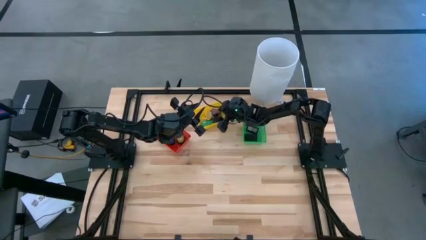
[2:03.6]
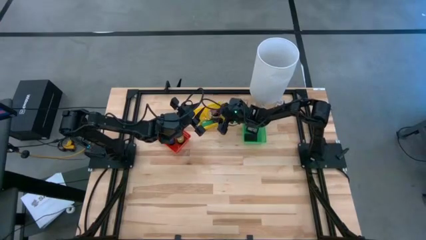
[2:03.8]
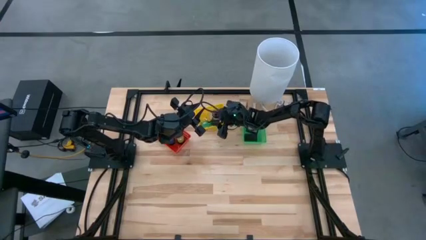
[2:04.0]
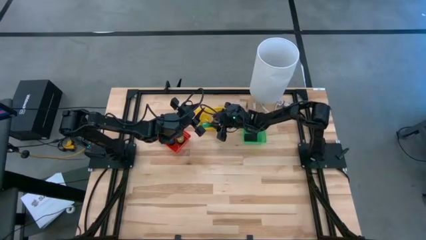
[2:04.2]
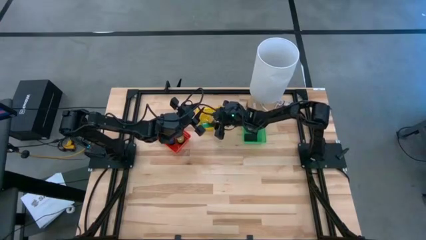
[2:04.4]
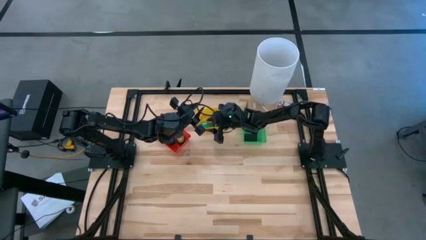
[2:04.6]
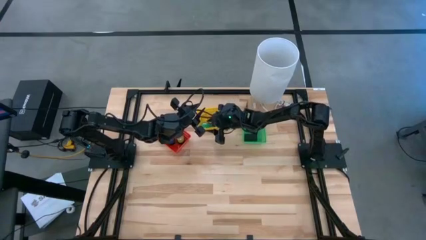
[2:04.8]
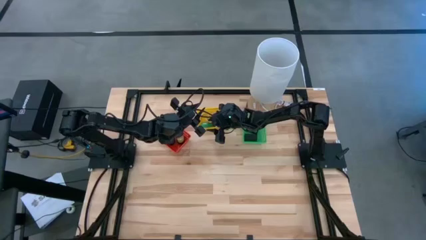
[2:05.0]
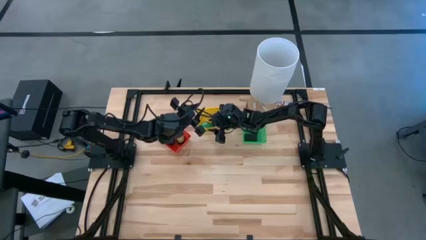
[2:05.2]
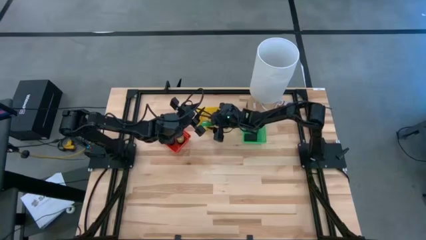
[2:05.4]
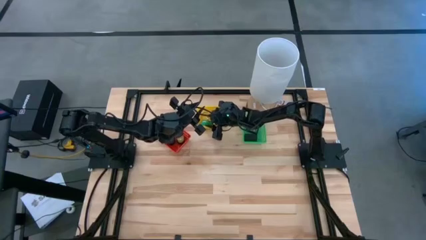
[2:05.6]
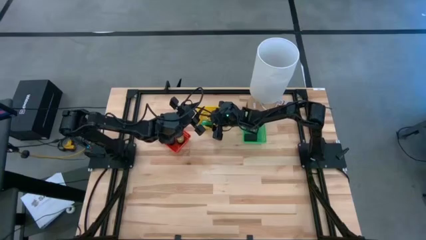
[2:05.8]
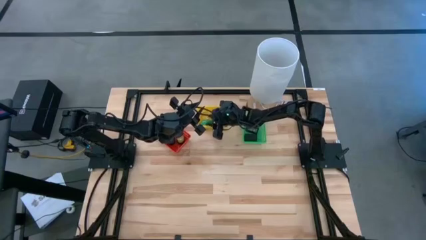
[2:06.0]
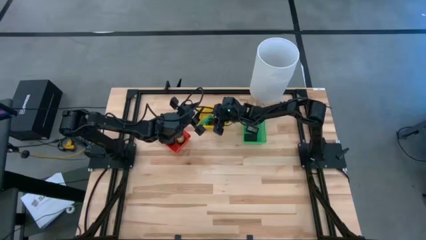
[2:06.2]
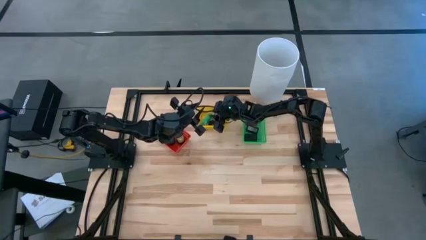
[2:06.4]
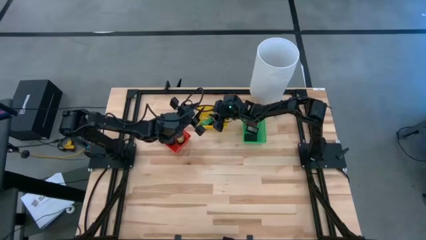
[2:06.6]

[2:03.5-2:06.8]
Task: Pick & Place Office items
Adjust the green watch

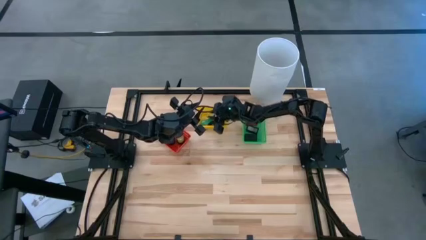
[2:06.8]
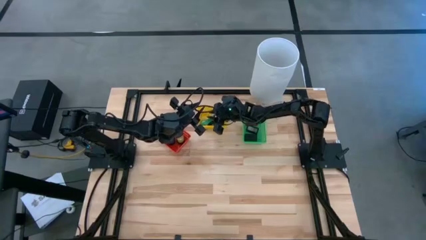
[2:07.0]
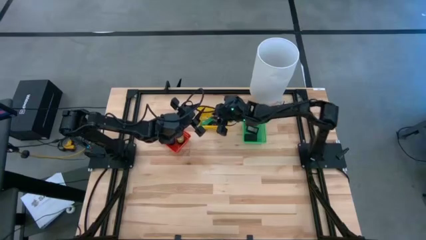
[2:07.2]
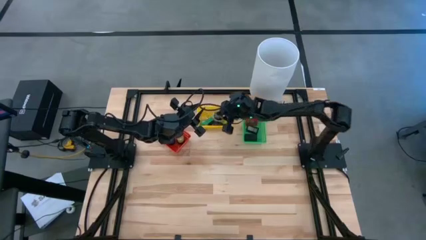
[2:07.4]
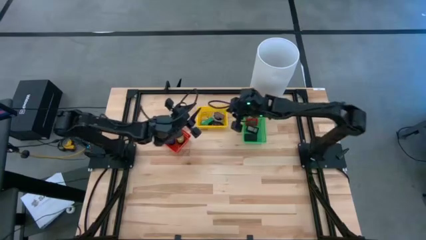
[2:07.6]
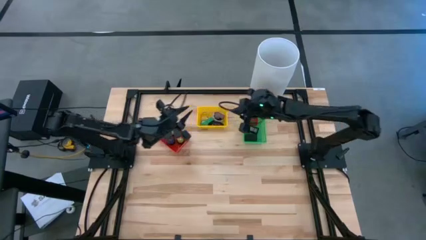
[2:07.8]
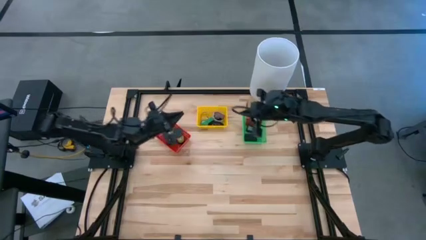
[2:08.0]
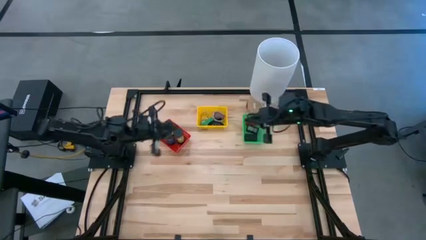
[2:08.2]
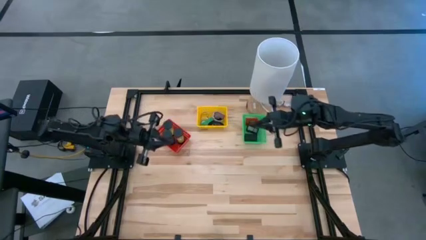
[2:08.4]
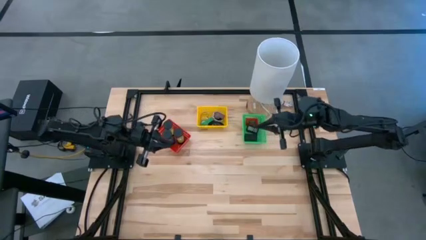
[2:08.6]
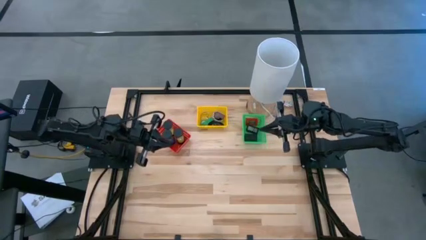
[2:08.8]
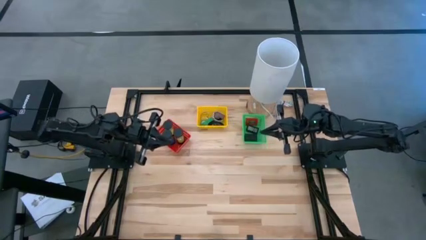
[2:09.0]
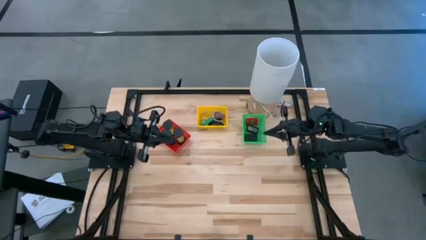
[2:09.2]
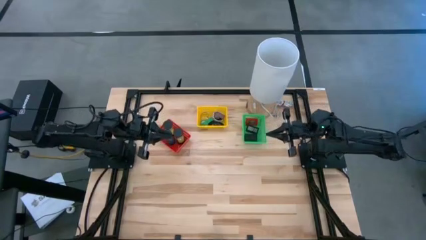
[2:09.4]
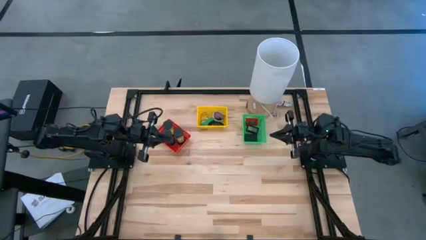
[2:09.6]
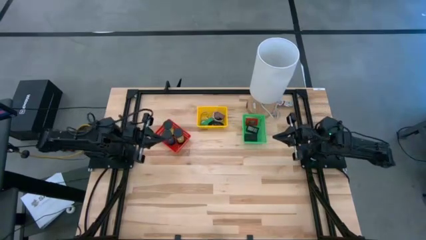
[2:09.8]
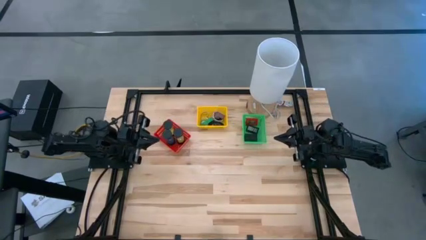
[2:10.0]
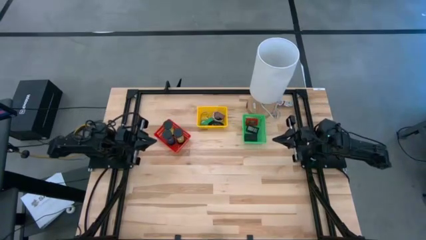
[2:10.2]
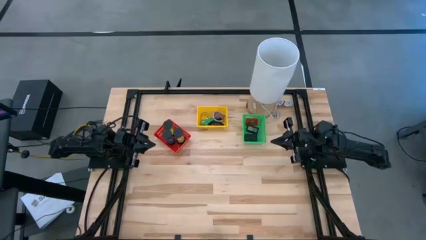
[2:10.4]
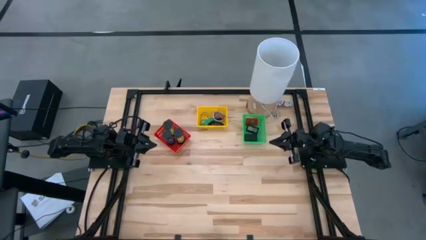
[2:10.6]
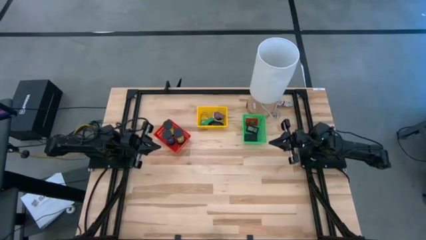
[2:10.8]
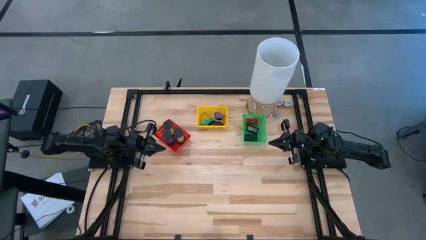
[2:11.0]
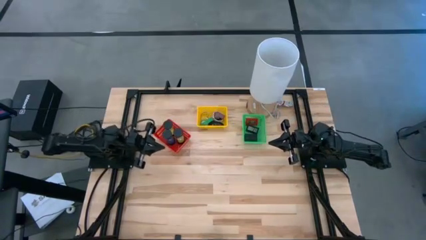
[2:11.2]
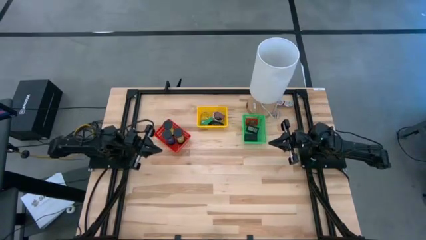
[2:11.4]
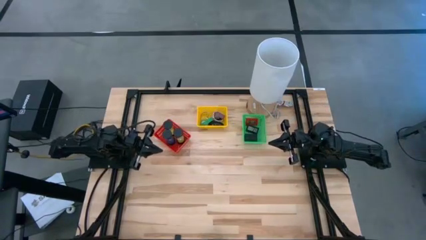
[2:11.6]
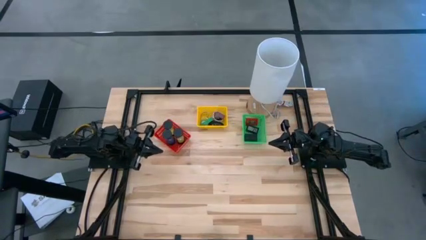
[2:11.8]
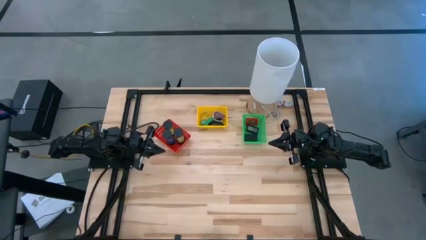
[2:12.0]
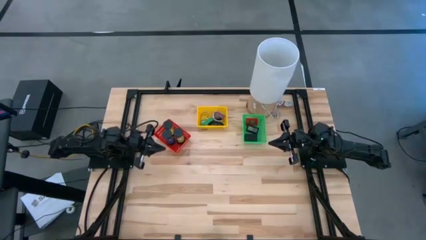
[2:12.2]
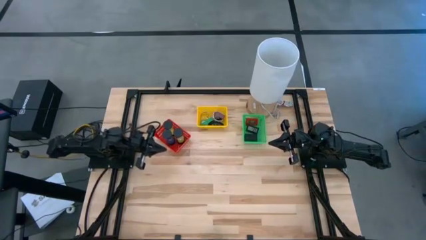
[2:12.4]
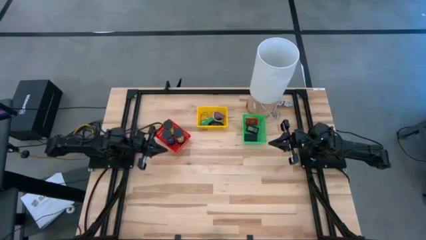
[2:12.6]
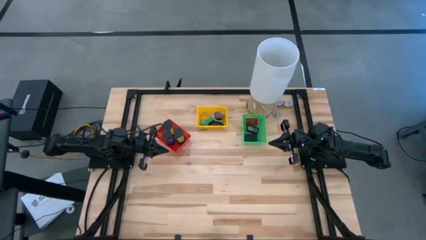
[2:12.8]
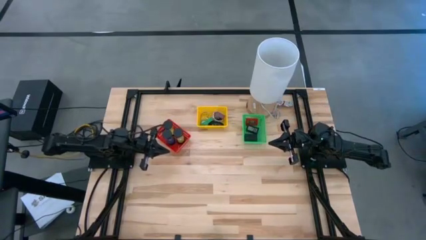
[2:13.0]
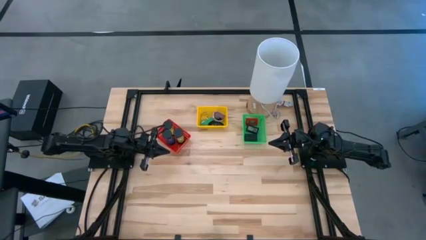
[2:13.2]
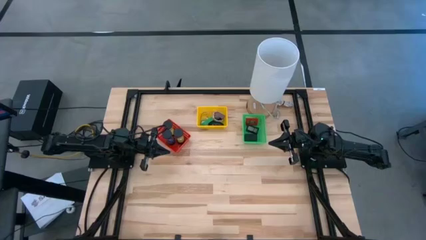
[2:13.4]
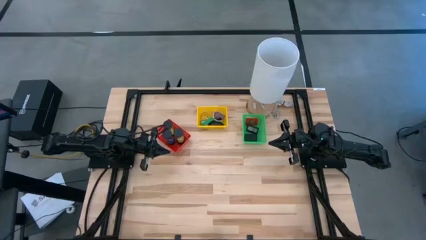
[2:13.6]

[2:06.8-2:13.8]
Return to Home Position

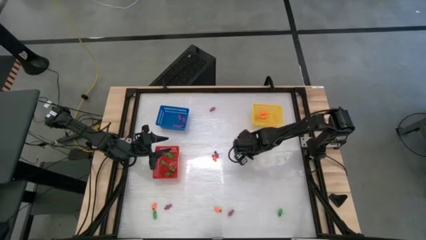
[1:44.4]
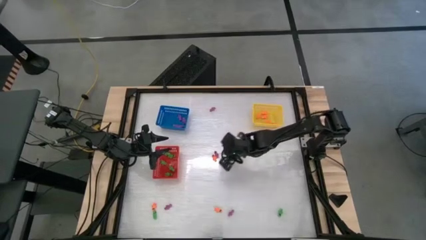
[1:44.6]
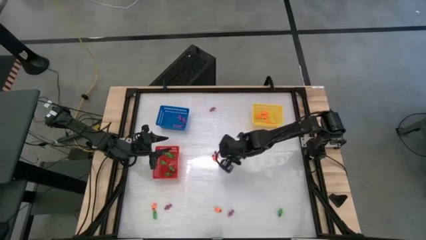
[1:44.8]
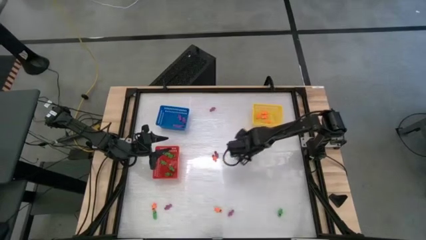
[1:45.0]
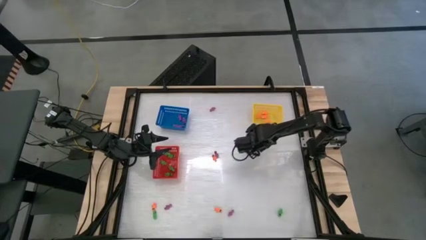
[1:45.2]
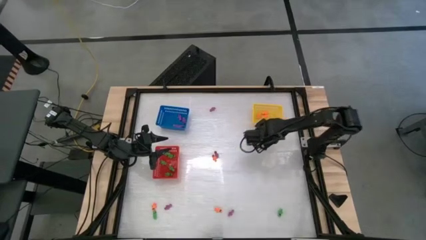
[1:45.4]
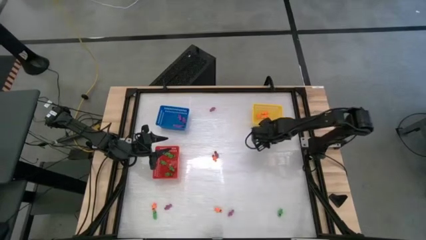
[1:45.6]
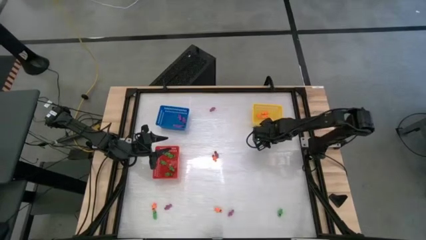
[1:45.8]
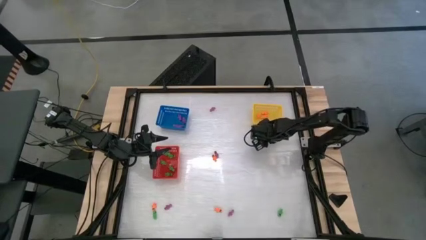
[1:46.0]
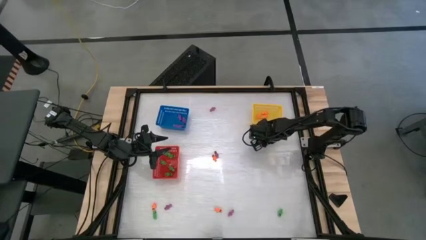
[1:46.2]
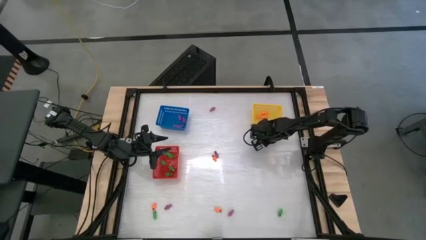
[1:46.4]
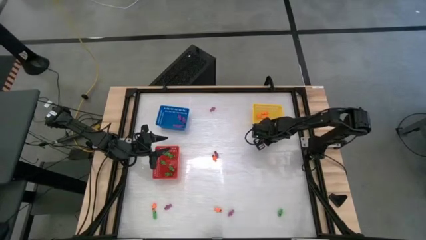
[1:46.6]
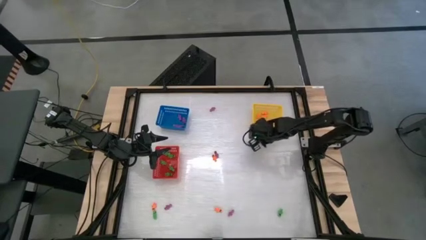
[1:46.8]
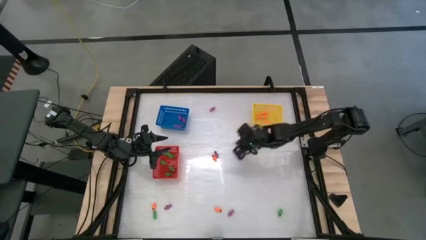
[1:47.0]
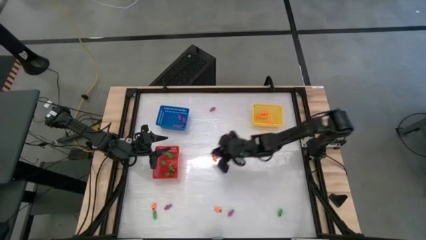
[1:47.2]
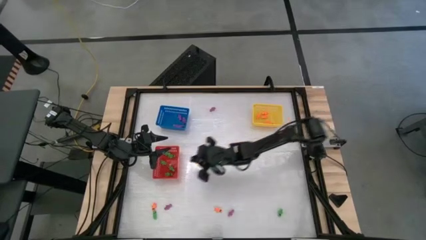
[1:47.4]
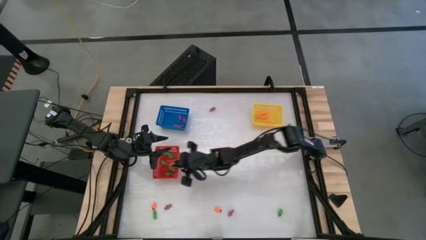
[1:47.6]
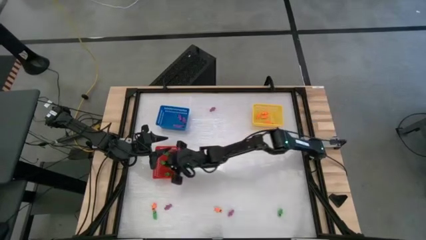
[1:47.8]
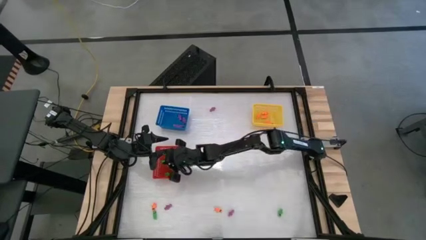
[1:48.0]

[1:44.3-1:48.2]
Task: Sort Halloween decoration
Put the green skeleton toy into the red bin

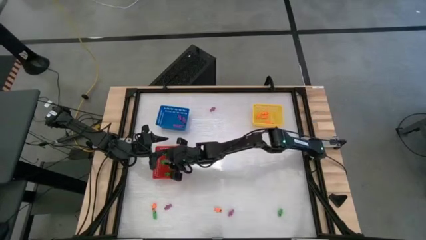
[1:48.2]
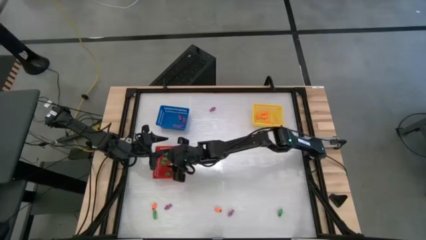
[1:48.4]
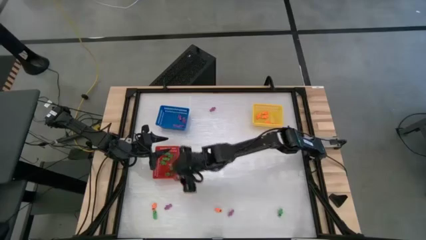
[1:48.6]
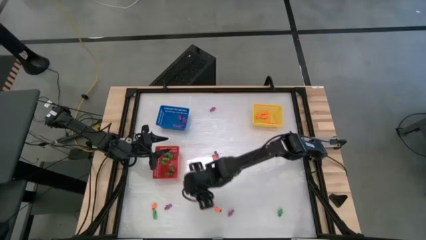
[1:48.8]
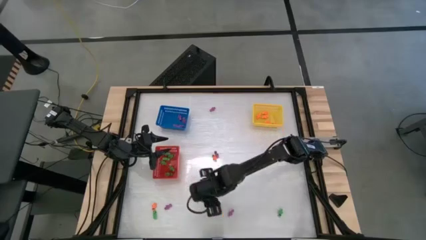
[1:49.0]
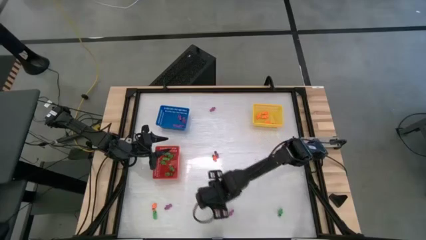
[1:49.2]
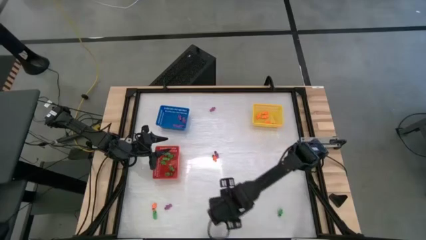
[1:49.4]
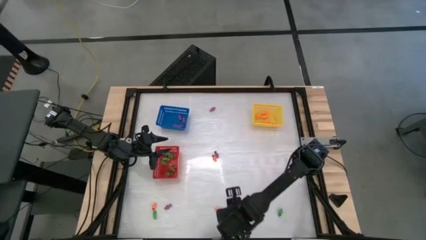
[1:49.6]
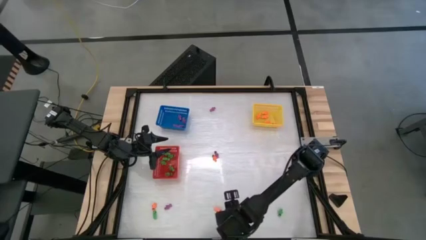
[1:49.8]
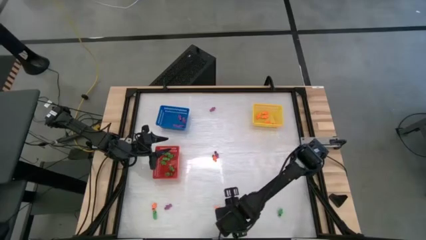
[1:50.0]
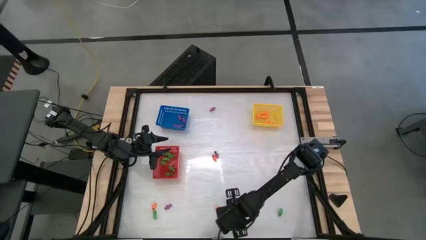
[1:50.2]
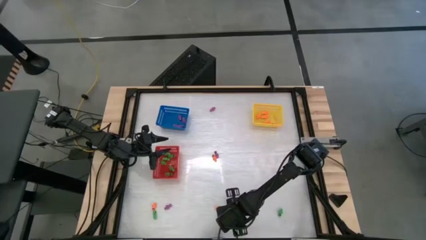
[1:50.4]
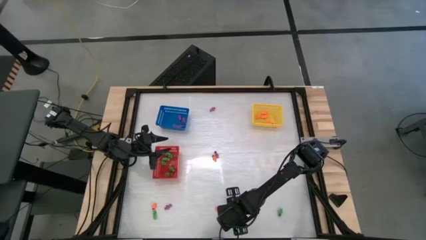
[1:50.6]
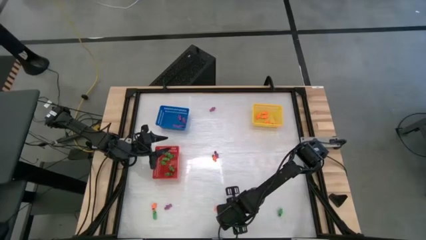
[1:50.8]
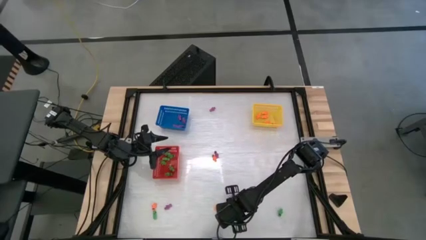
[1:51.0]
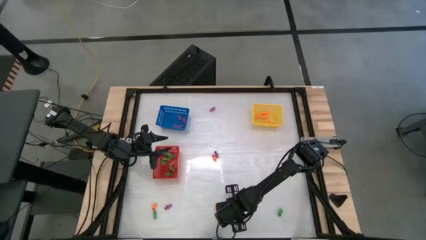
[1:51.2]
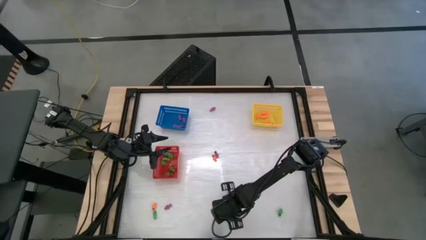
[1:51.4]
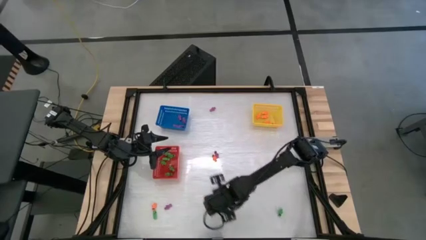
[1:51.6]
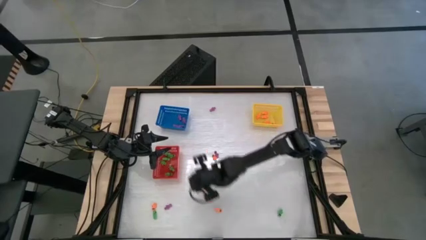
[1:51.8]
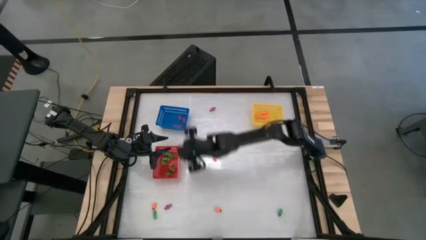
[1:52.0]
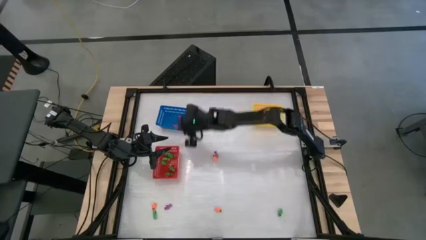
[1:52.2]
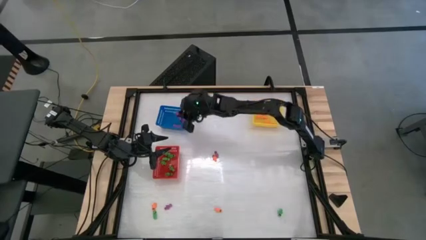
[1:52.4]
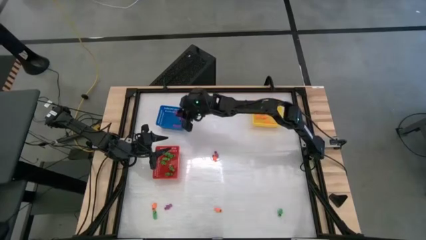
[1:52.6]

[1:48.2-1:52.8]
Put the violet skeleton toy into the blue bin
